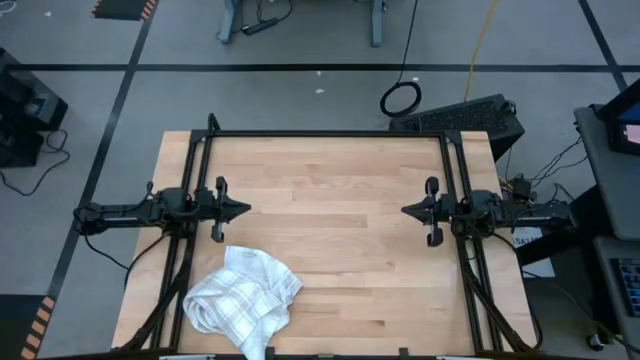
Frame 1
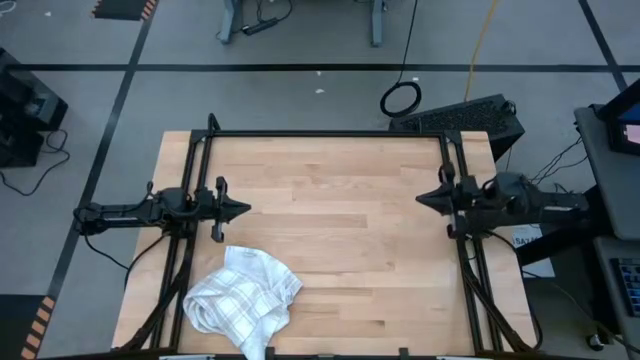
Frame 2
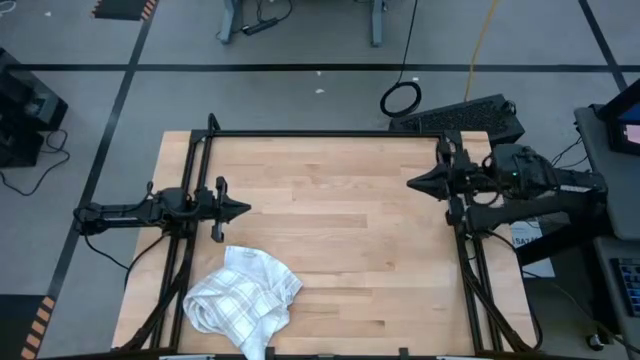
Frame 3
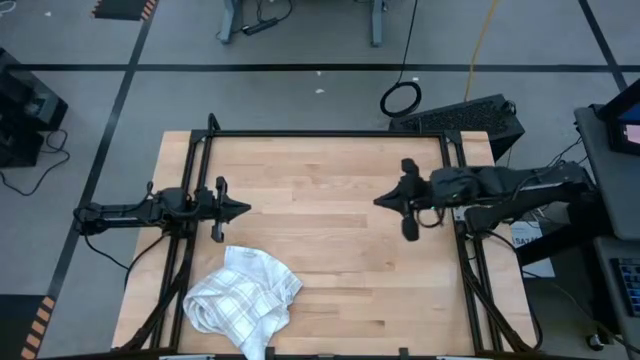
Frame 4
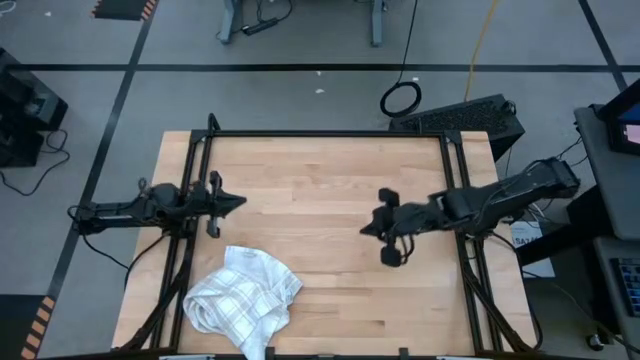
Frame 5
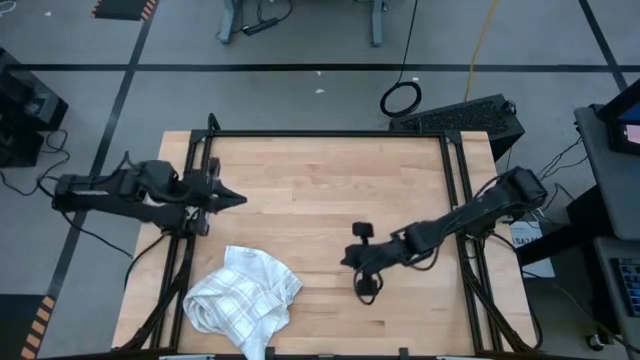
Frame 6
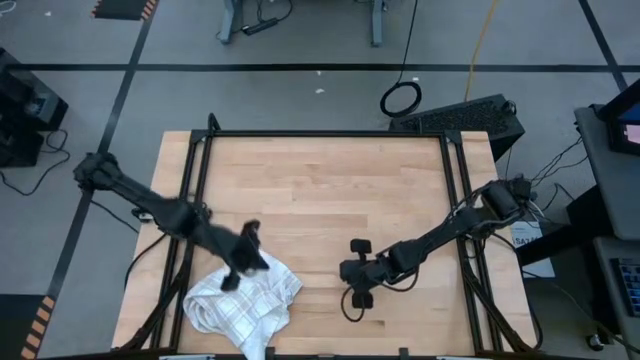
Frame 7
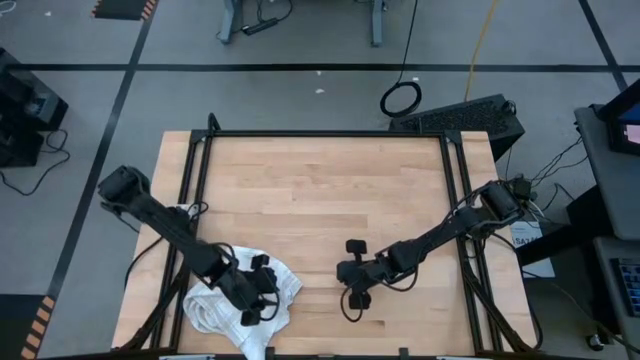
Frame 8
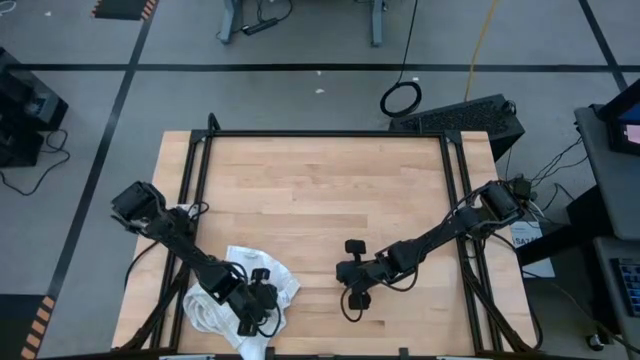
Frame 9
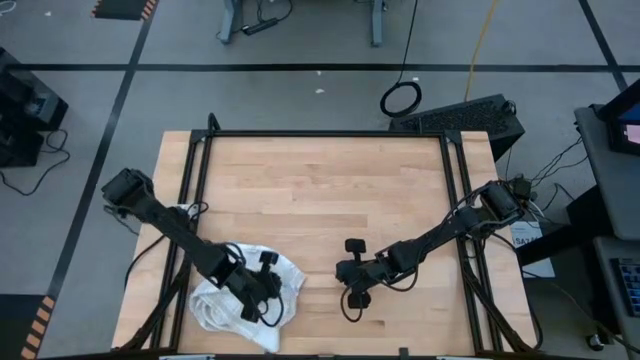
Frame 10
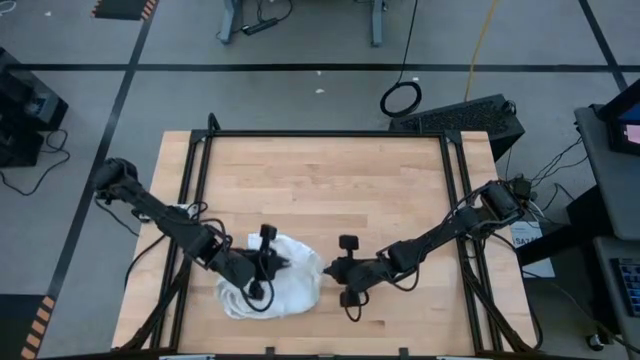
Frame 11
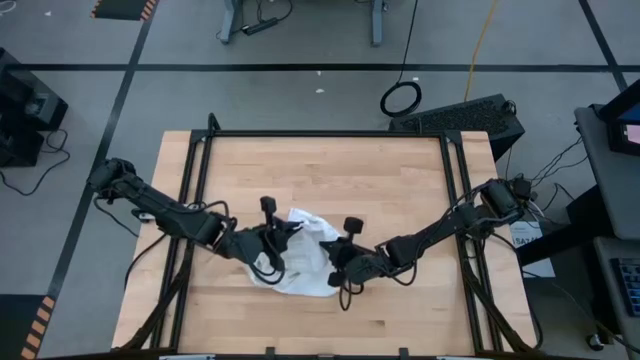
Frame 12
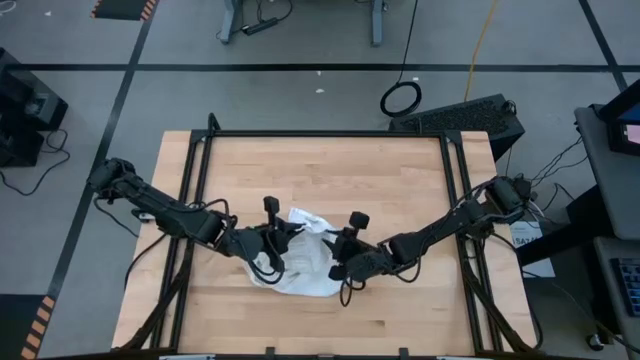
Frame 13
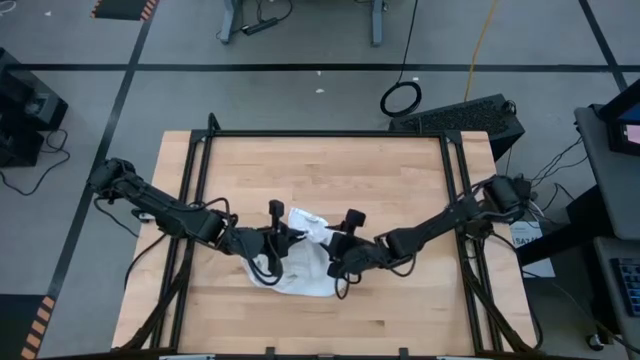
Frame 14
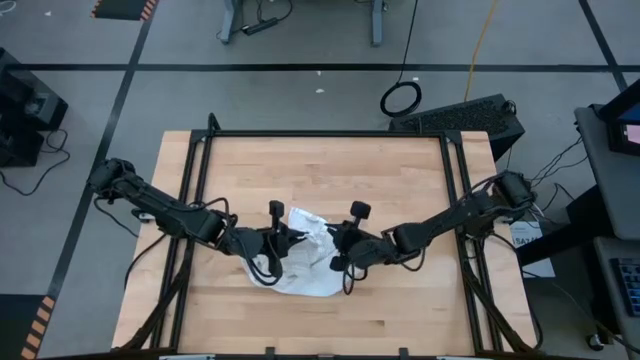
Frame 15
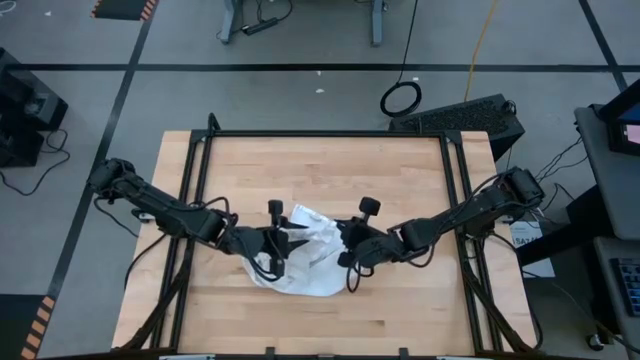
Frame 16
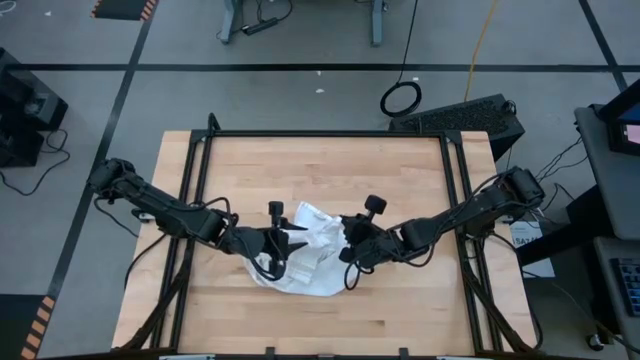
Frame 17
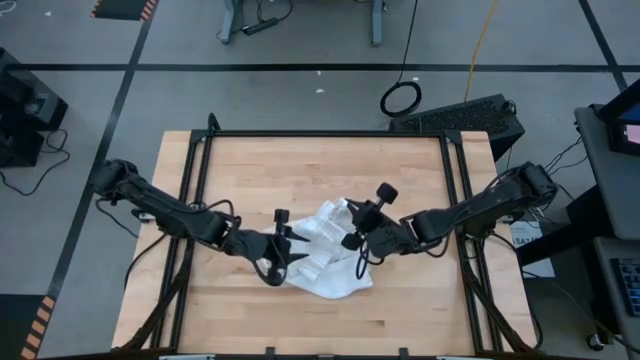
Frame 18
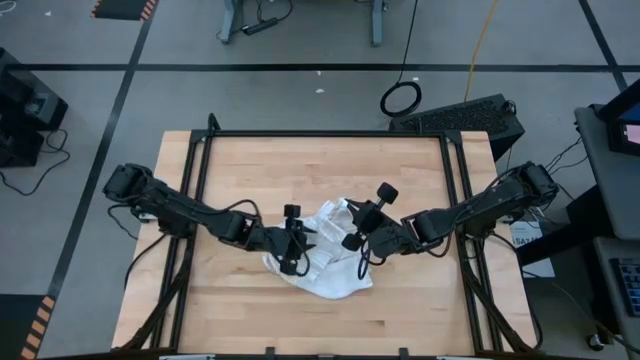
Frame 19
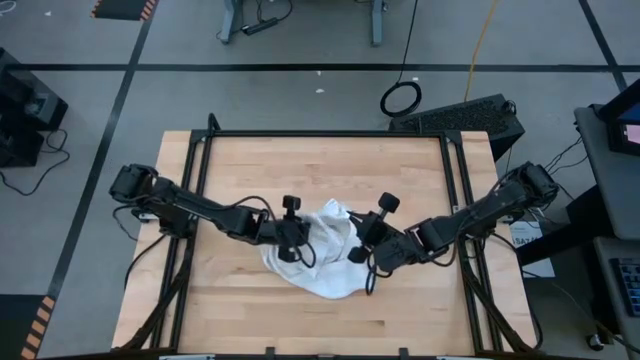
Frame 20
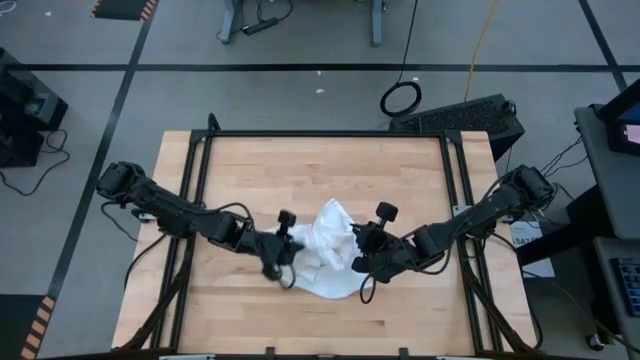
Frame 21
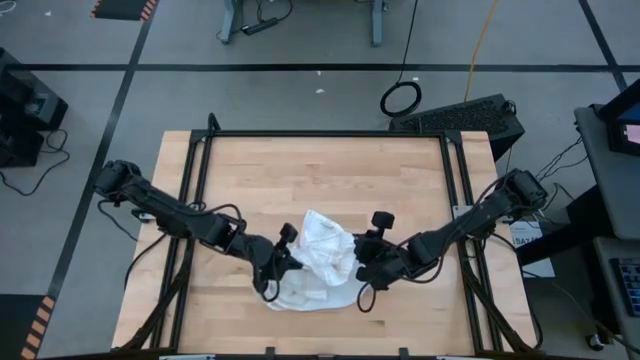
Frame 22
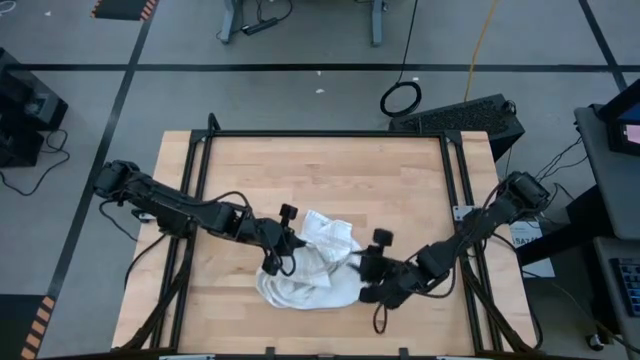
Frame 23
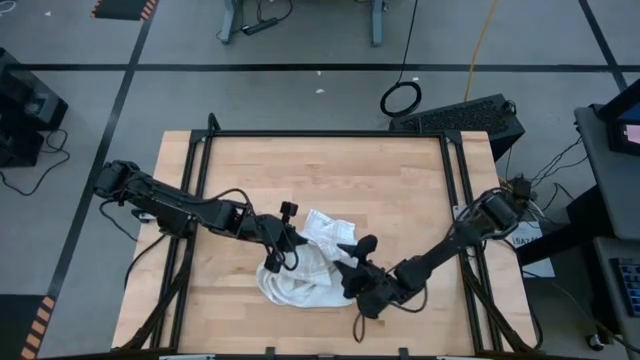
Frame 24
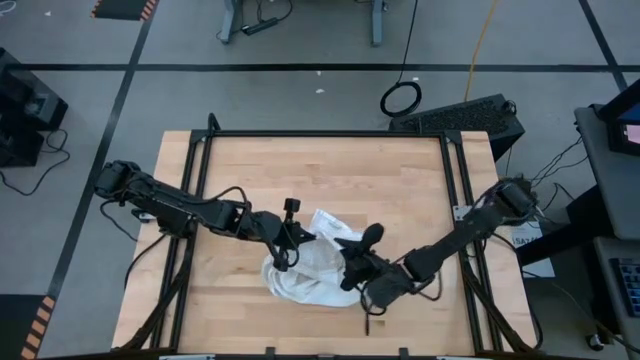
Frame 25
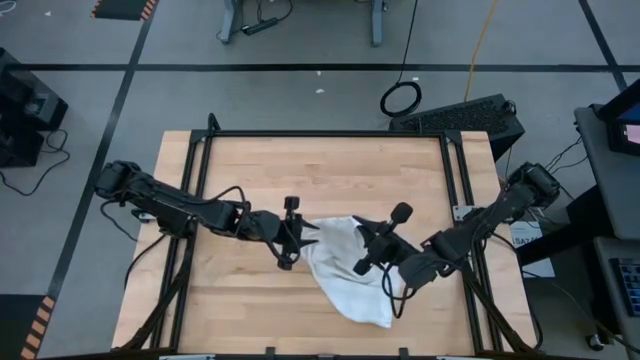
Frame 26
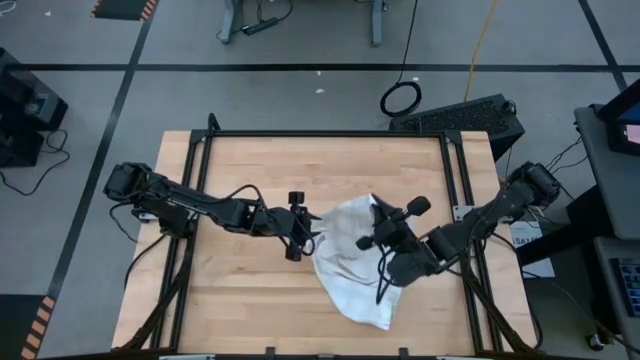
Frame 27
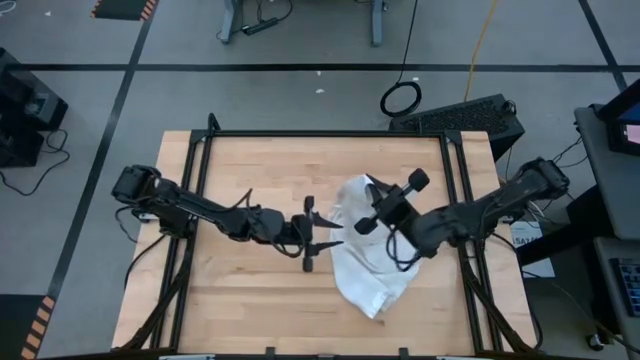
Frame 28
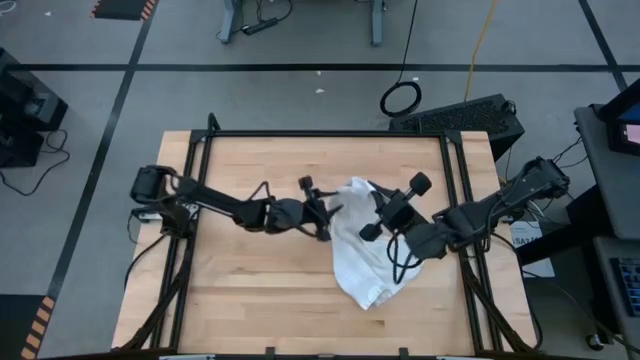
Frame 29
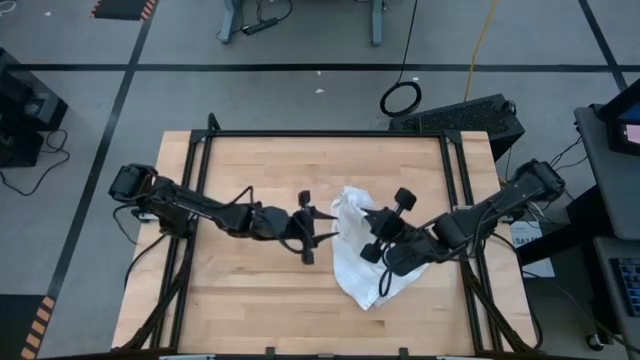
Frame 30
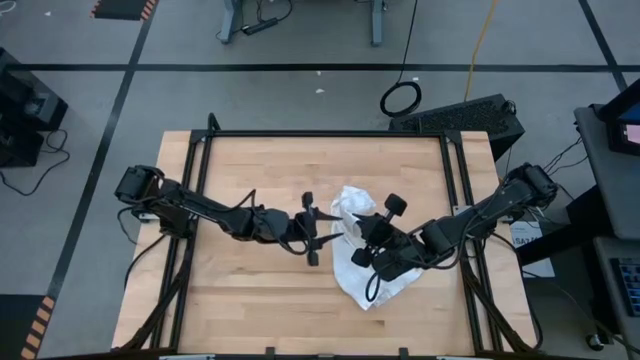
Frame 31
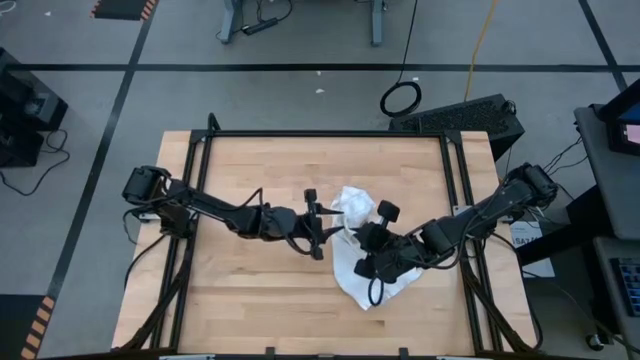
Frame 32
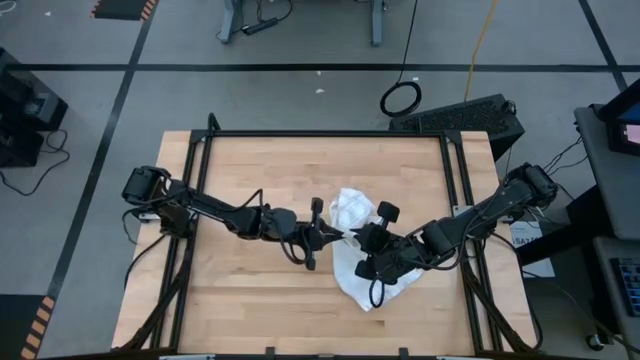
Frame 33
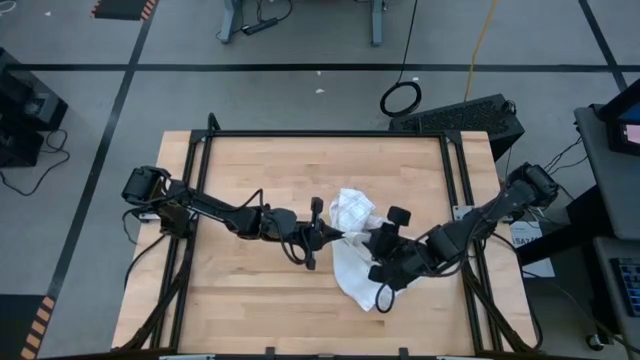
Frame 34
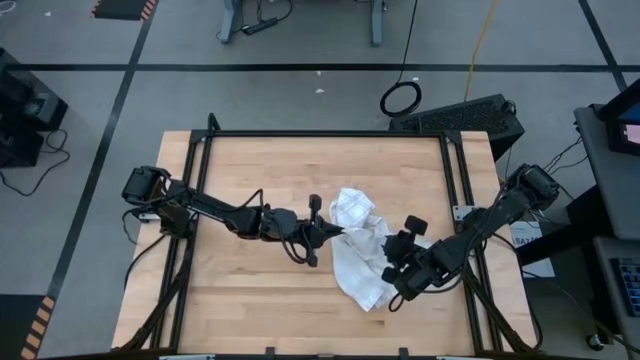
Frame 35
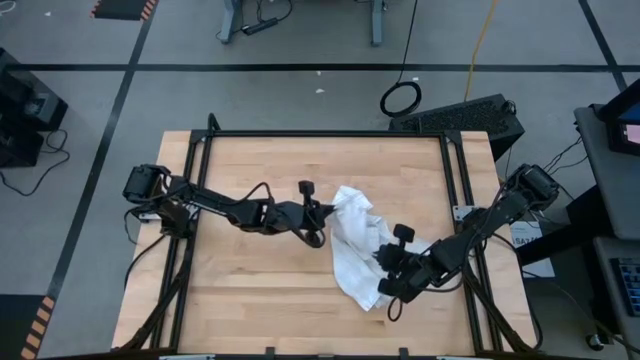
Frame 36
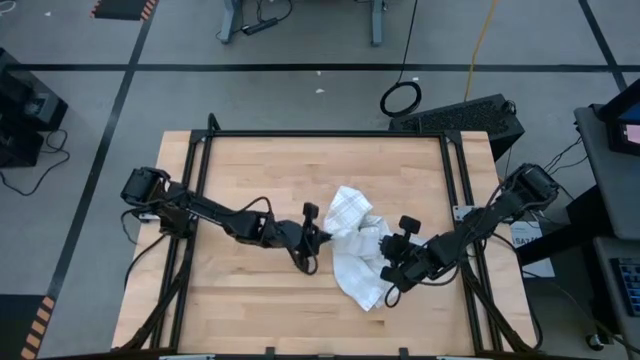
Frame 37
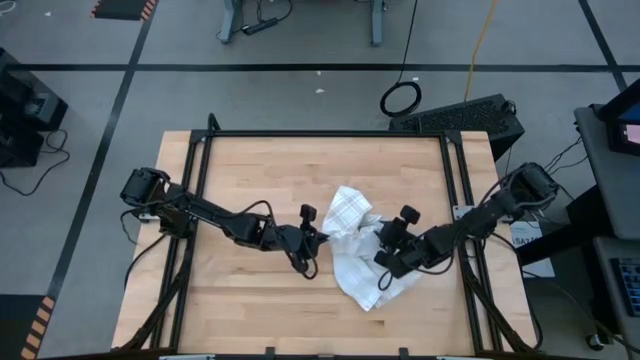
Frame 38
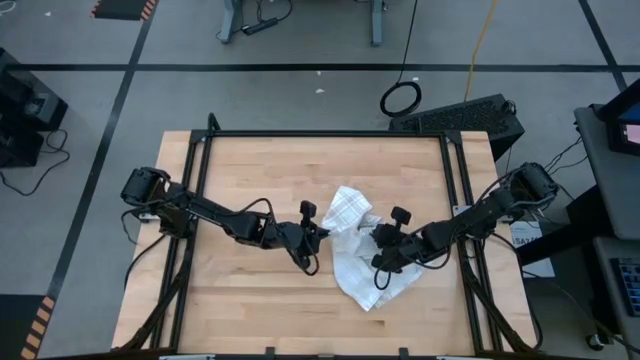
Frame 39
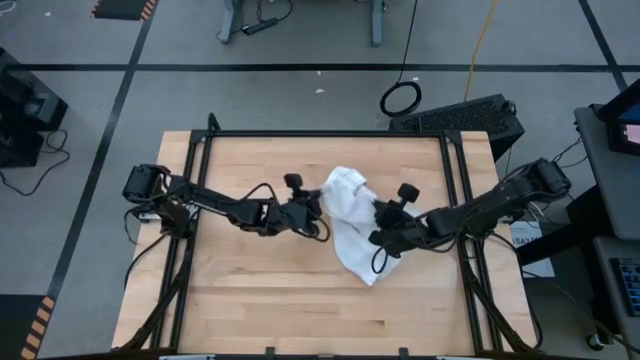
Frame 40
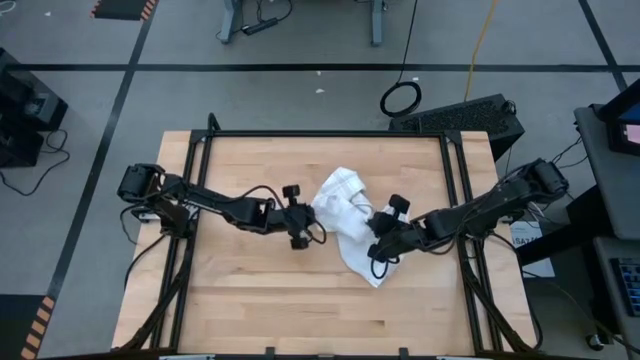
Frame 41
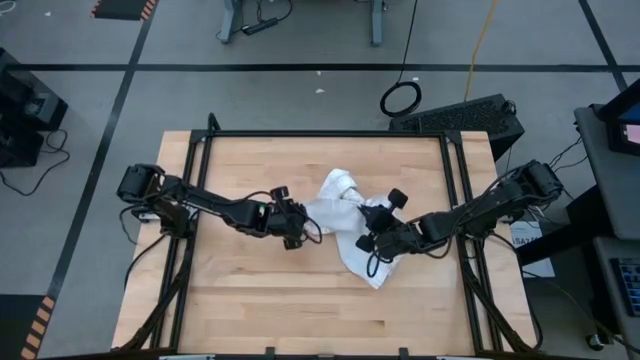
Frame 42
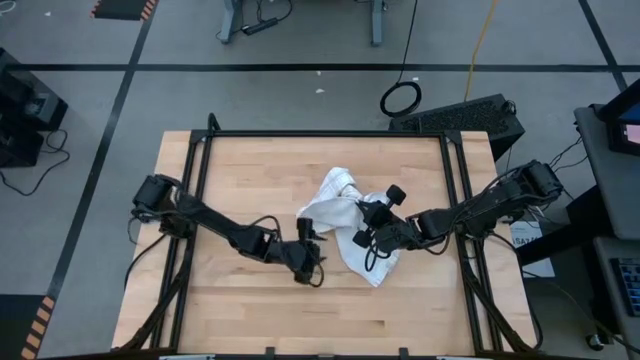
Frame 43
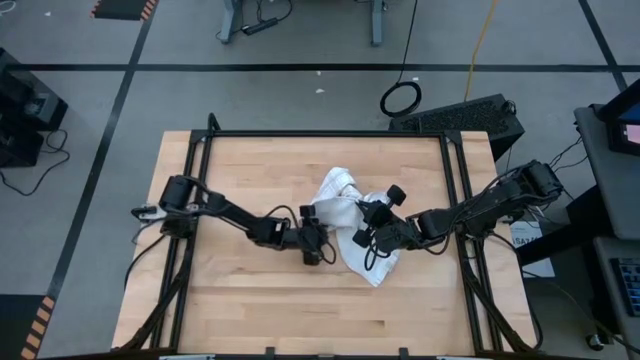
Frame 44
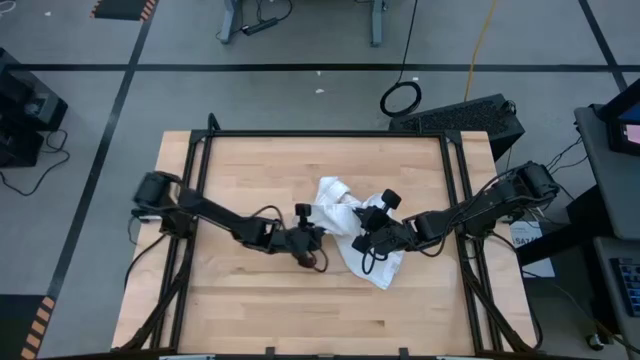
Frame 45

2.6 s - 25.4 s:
Task: Roll towel
Roll the towel
